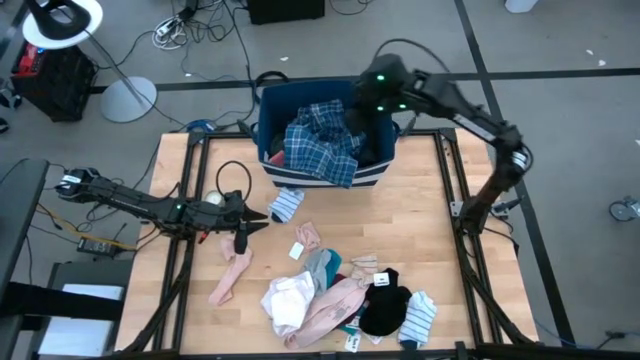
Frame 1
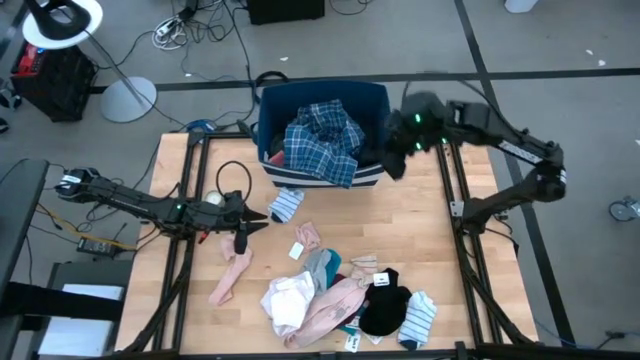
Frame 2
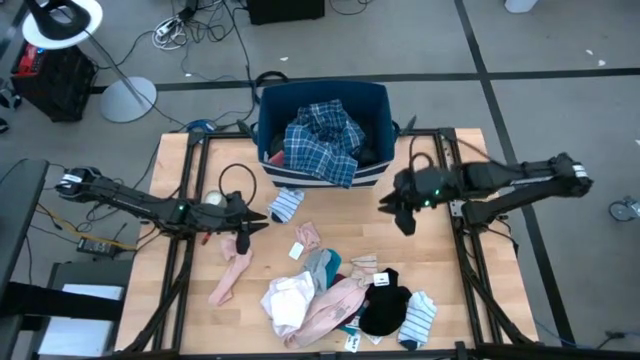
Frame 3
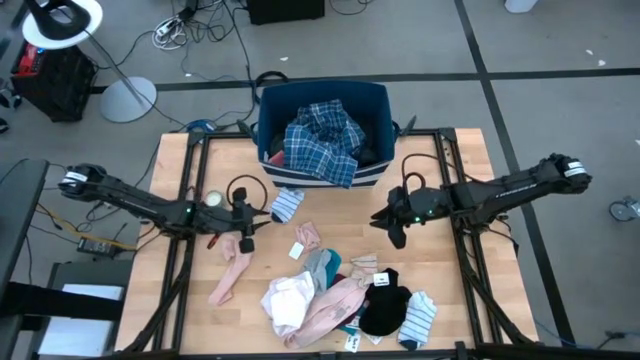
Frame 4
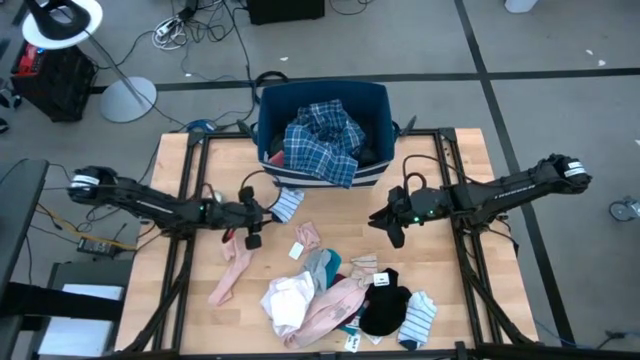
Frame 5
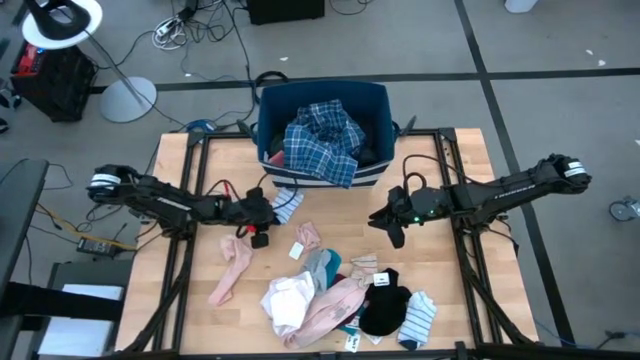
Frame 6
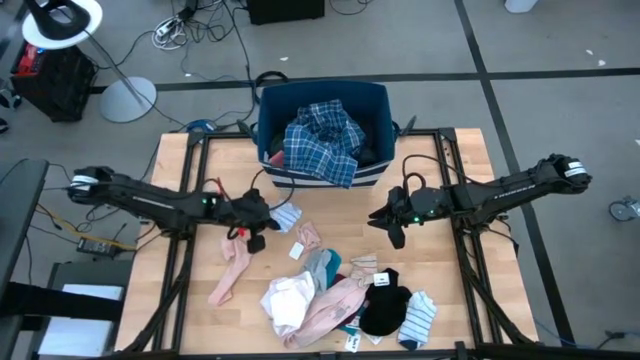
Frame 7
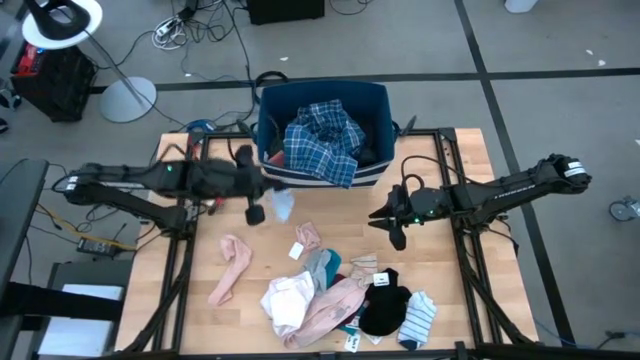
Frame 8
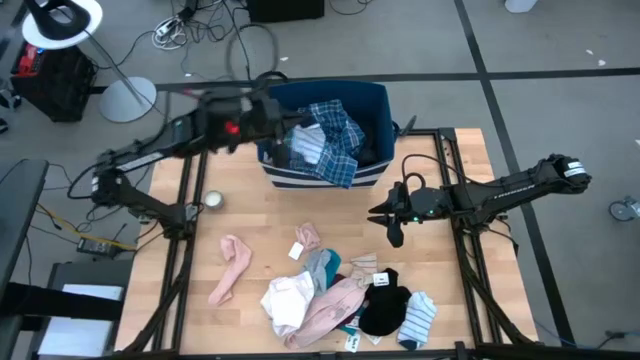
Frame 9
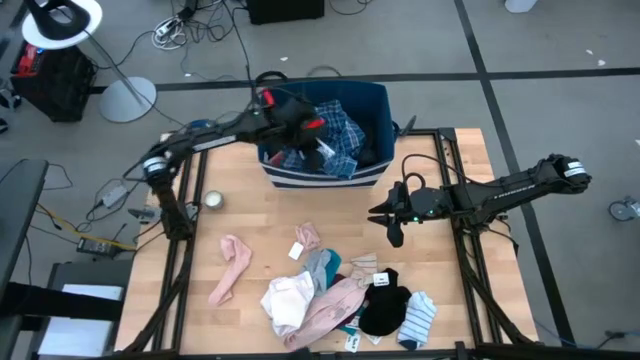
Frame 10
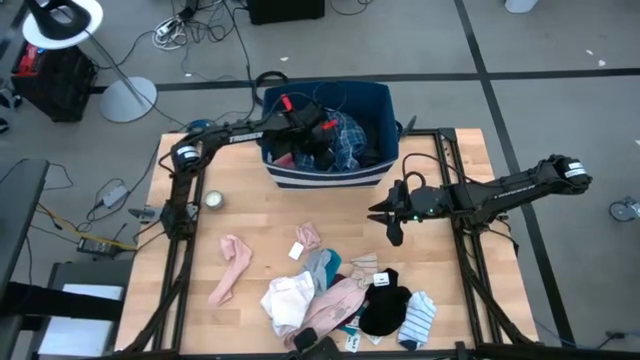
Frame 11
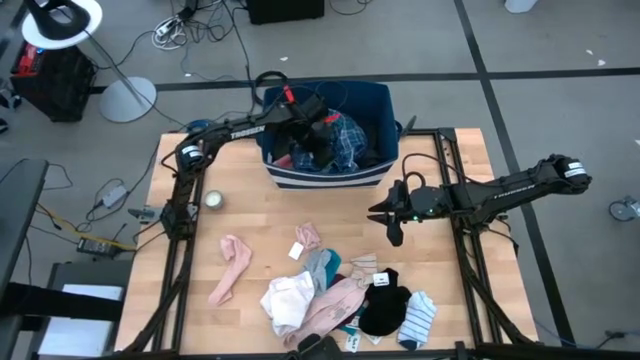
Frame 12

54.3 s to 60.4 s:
Task: Sort clothes
Put the top striped sock into the blue laundry organizer

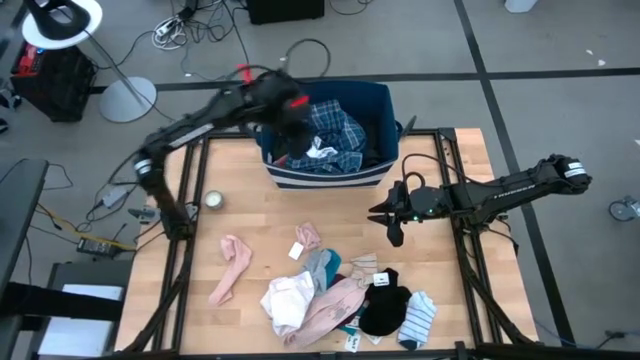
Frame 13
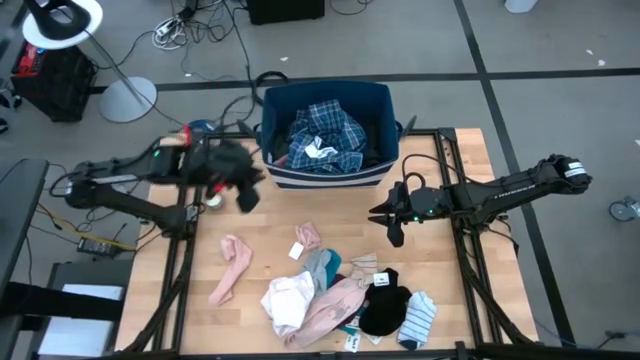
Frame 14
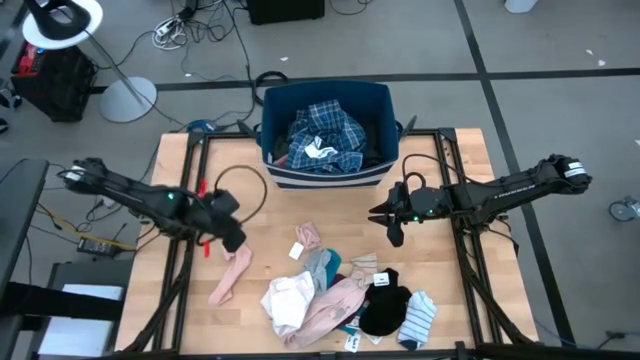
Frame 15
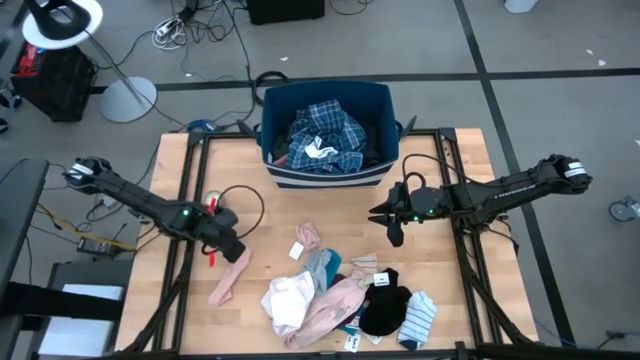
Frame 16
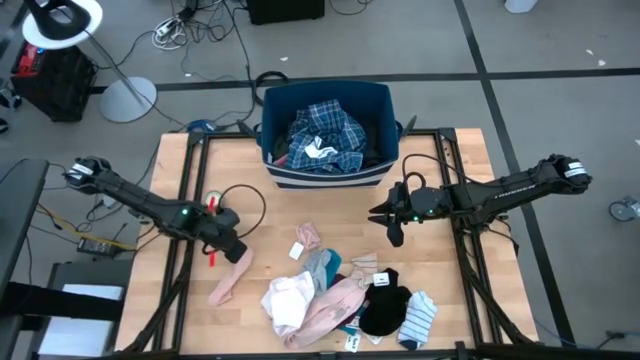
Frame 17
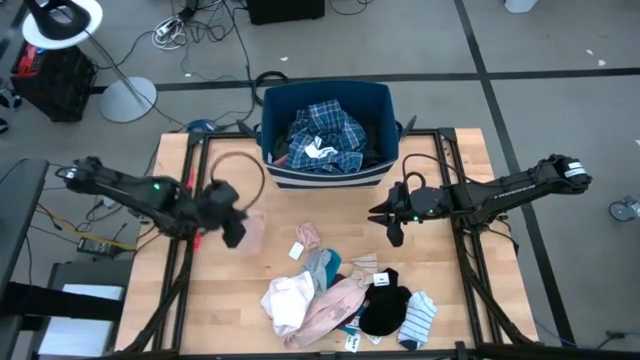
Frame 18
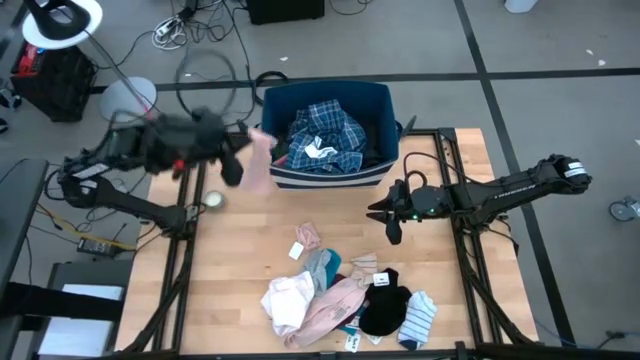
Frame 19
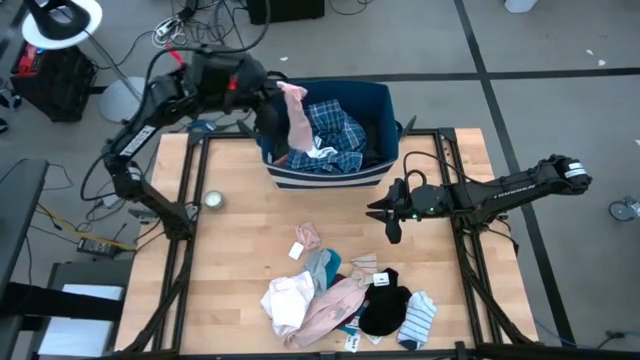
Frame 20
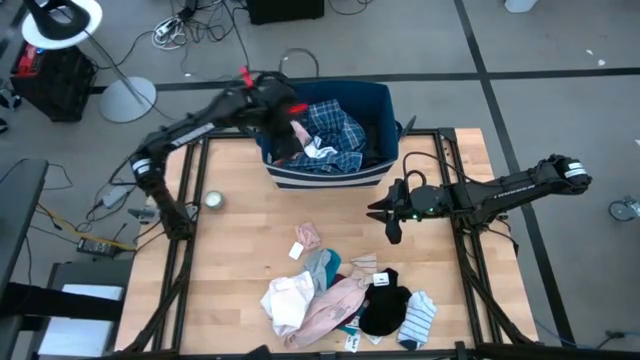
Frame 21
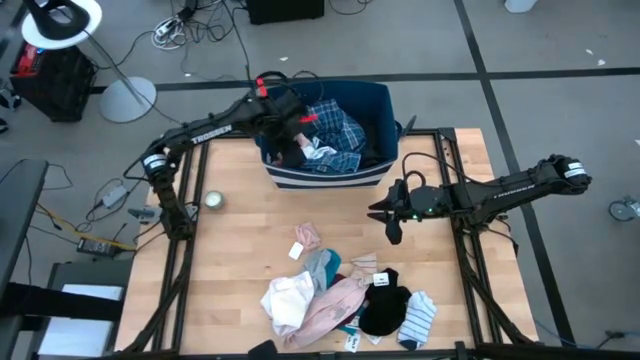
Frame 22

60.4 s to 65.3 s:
Put the left pink sock into the blue laundry organizer

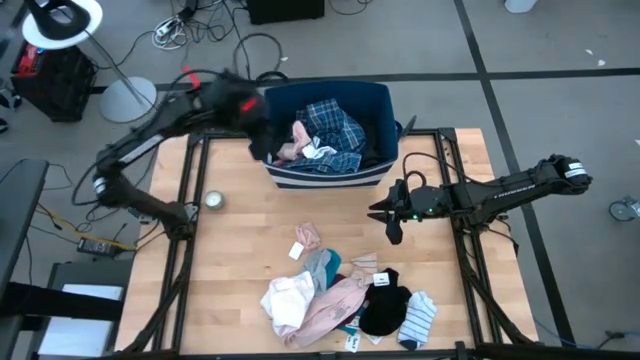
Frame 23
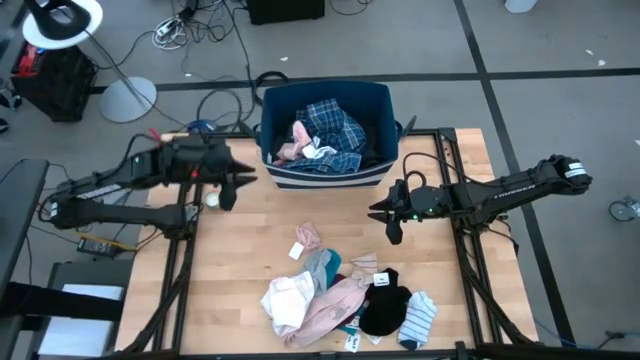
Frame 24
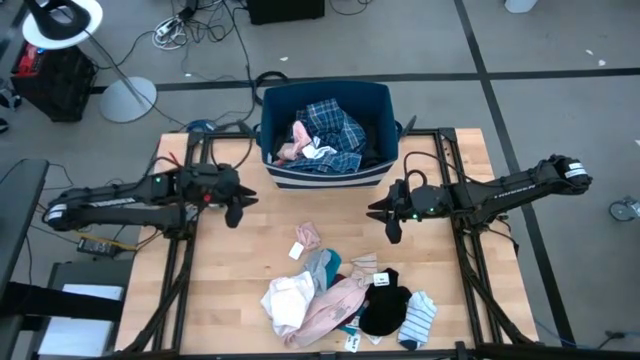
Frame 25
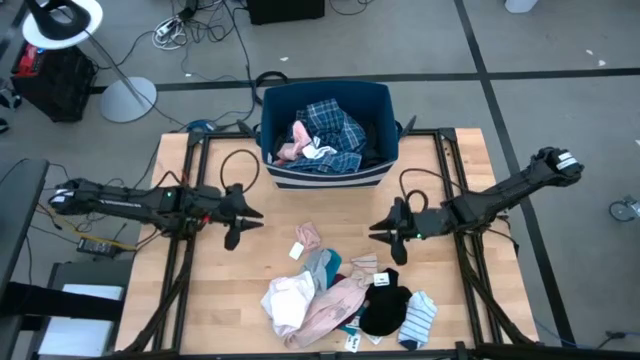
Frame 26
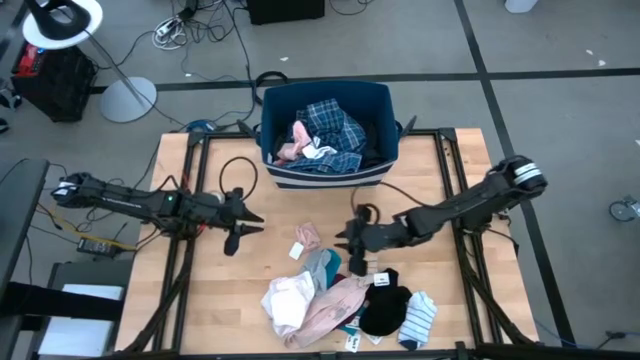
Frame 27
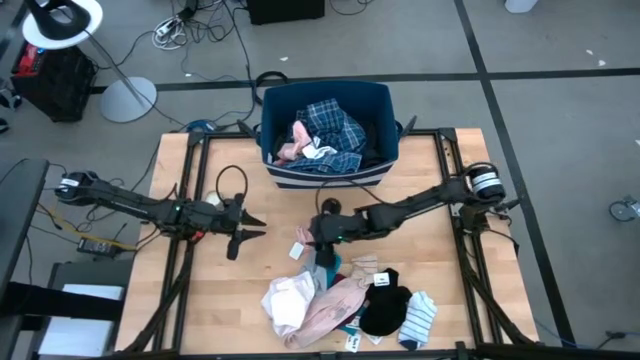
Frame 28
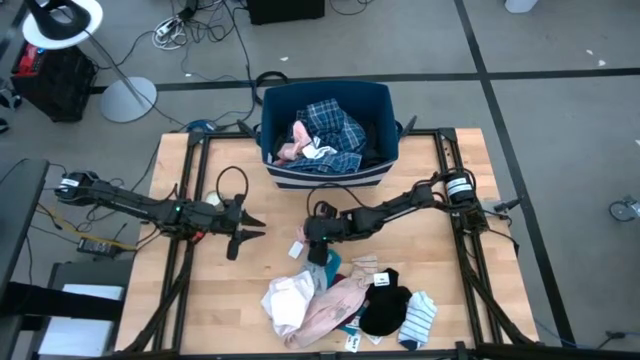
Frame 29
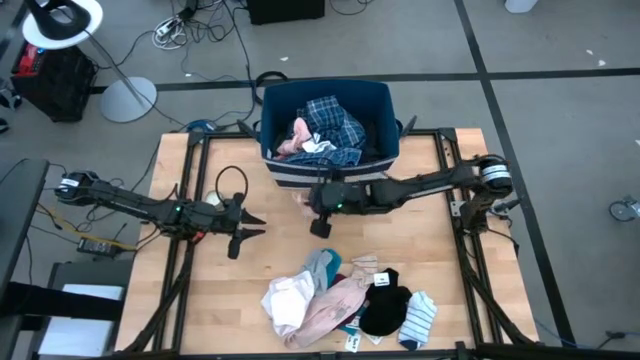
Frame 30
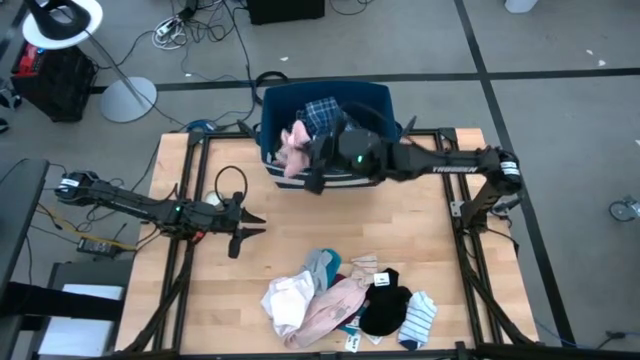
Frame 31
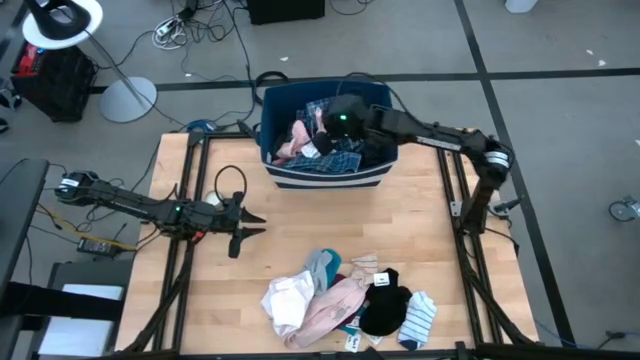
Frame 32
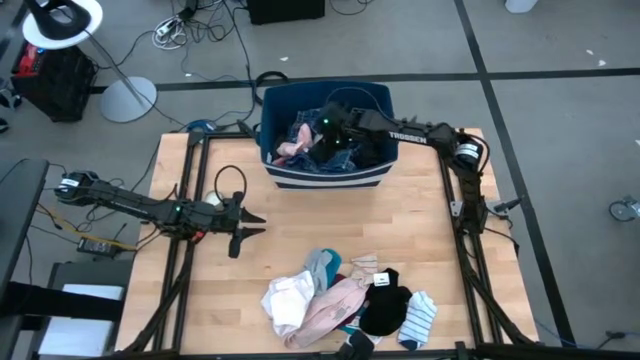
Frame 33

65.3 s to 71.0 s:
Put the pink sock into the blue laundry organizer

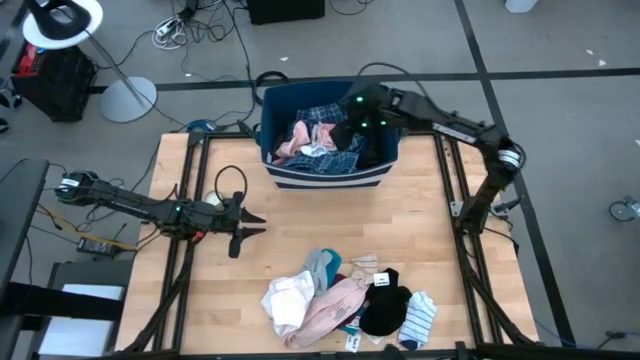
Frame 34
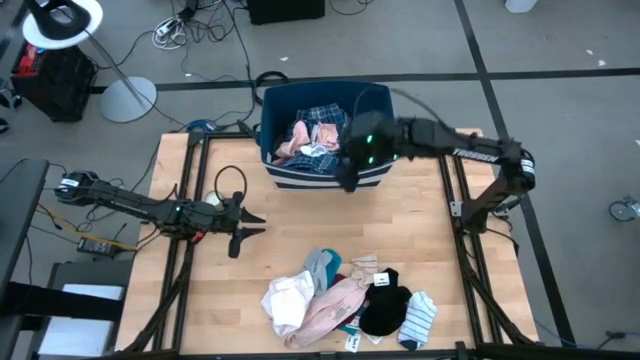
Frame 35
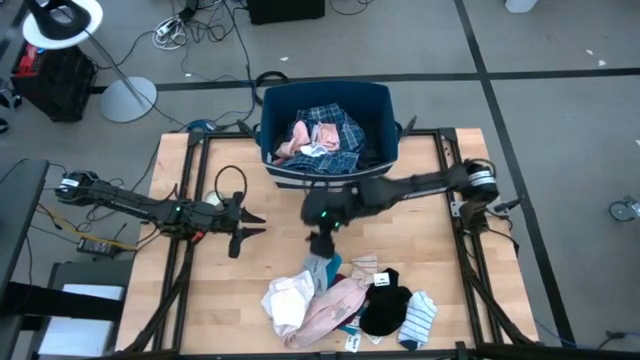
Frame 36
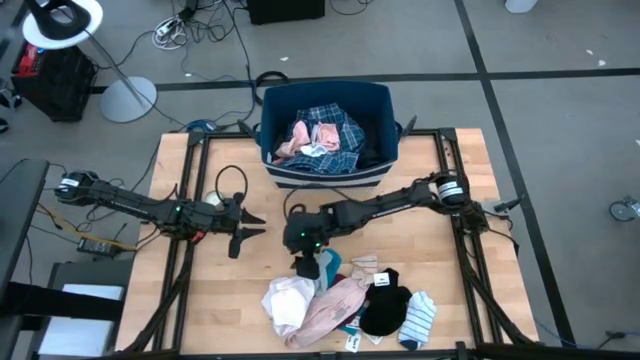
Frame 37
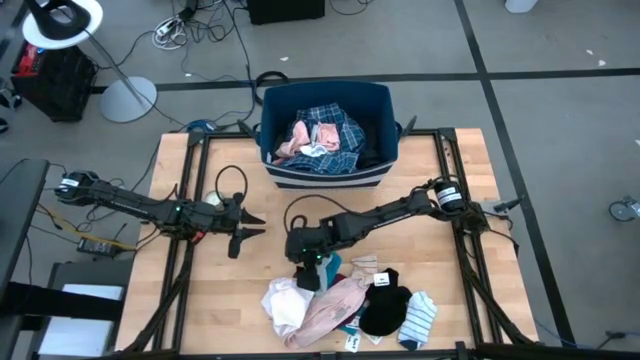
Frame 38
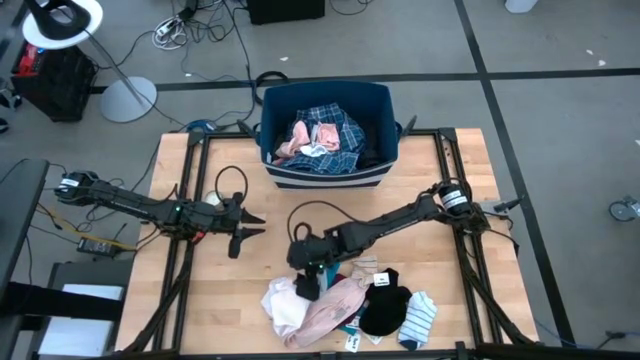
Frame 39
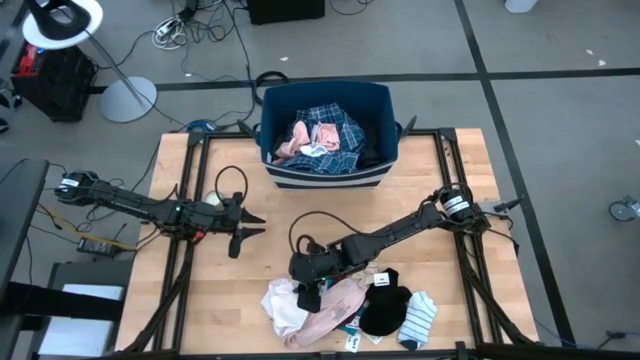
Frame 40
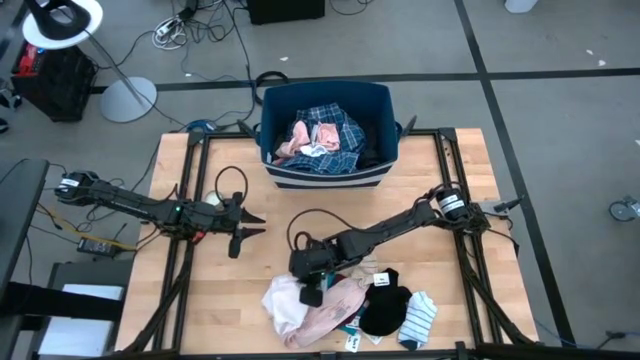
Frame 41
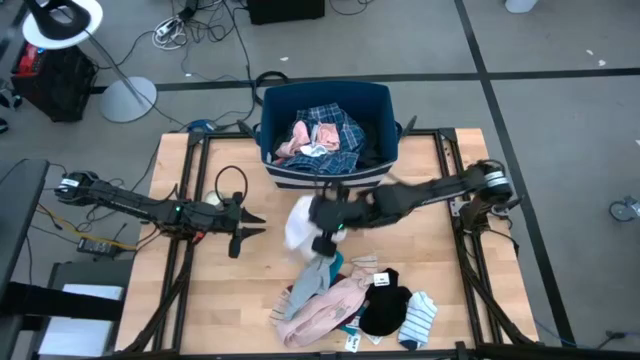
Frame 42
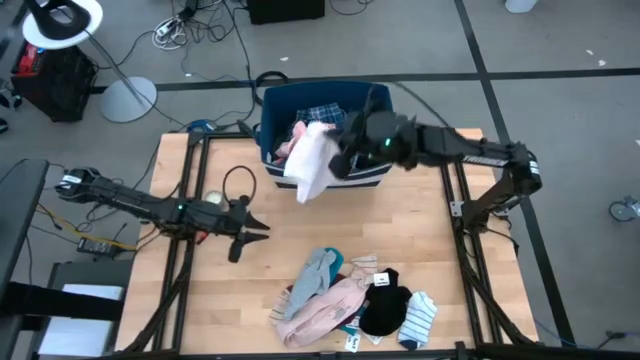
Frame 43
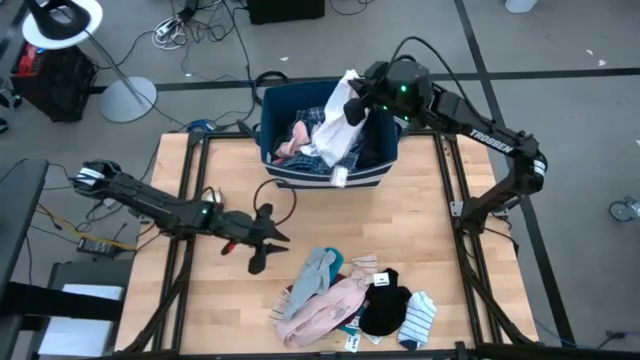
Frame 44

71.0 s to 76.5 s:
Put the white boxer into the blue laundry organizer
